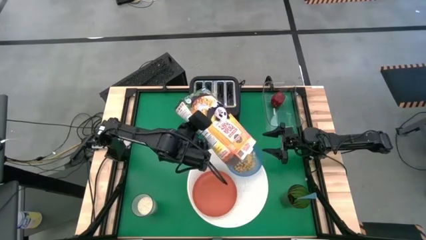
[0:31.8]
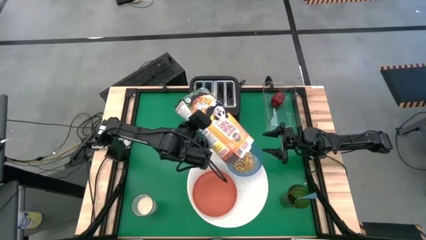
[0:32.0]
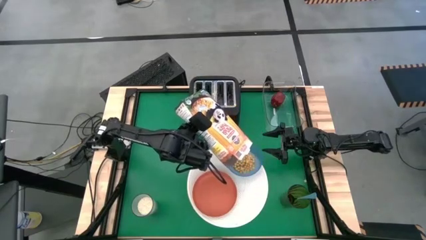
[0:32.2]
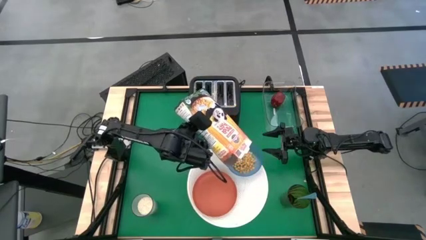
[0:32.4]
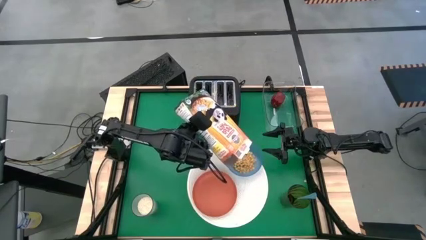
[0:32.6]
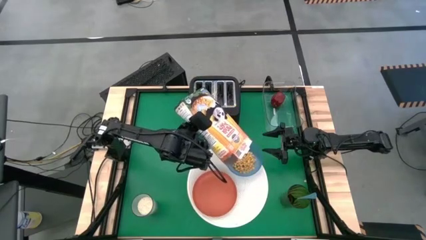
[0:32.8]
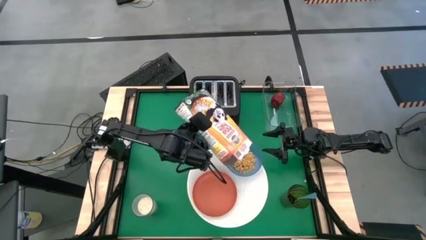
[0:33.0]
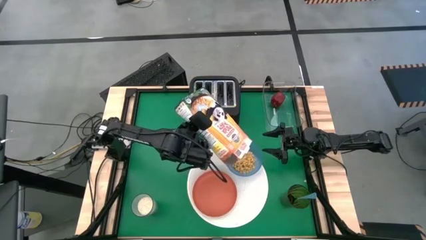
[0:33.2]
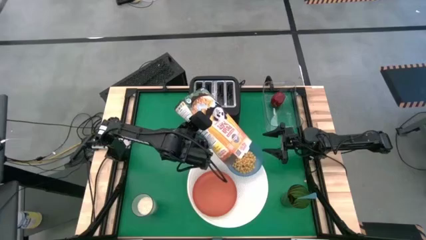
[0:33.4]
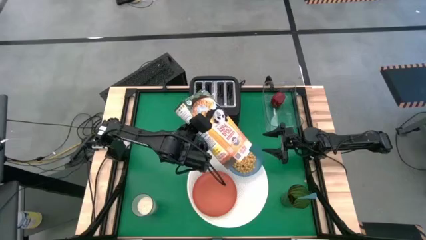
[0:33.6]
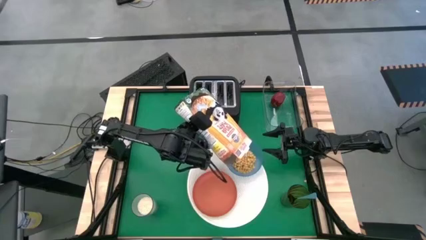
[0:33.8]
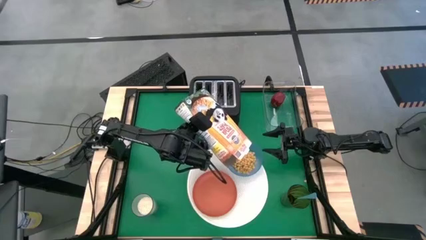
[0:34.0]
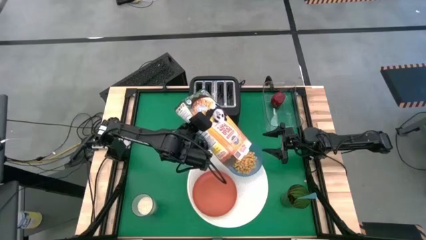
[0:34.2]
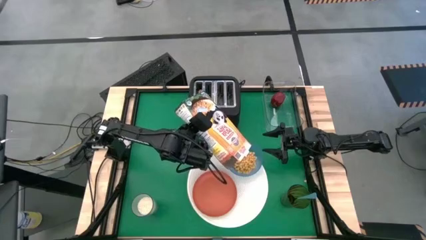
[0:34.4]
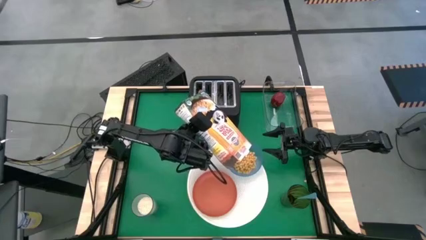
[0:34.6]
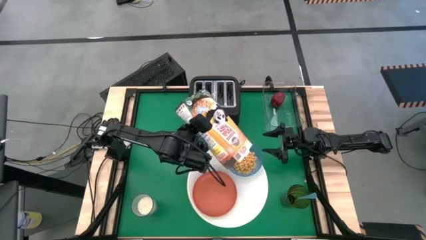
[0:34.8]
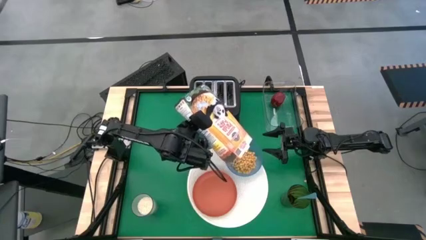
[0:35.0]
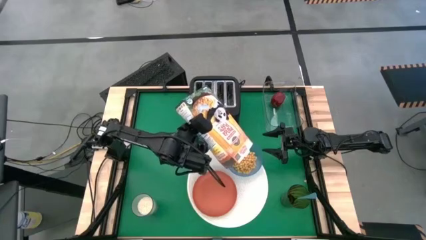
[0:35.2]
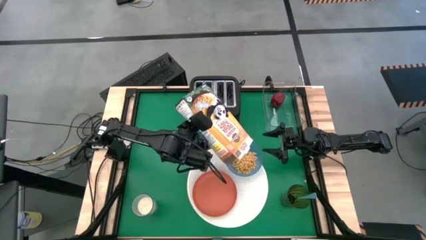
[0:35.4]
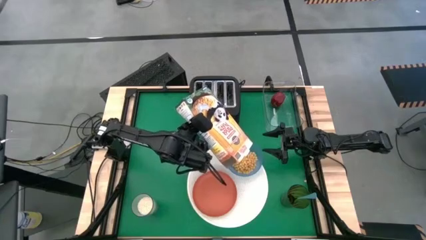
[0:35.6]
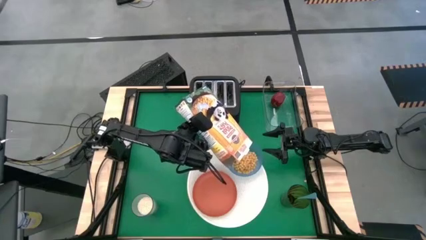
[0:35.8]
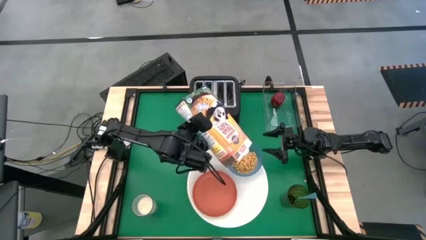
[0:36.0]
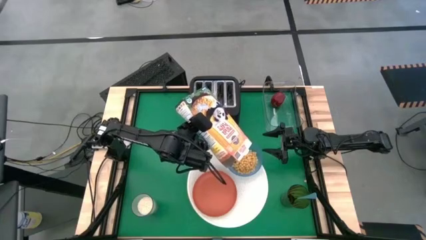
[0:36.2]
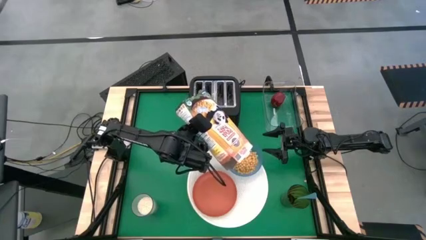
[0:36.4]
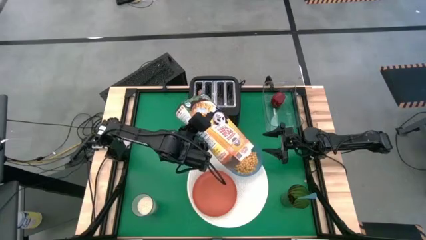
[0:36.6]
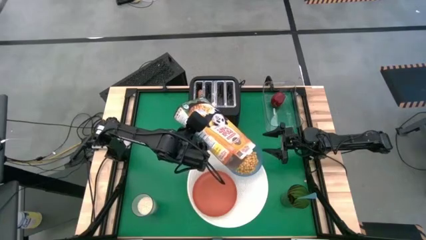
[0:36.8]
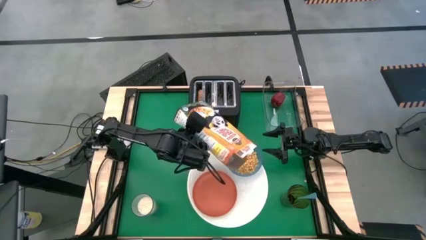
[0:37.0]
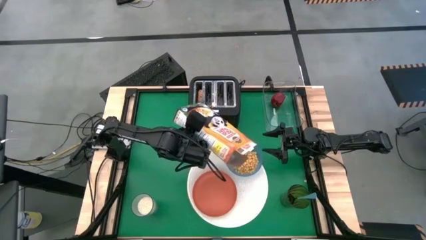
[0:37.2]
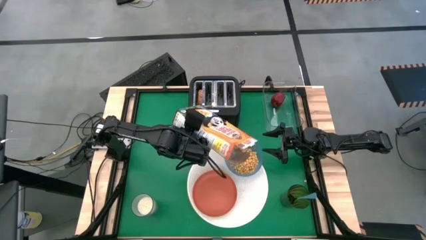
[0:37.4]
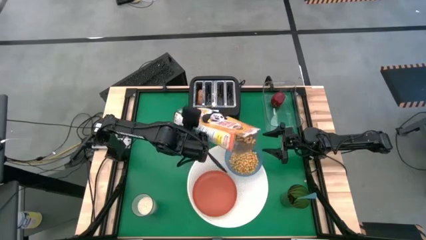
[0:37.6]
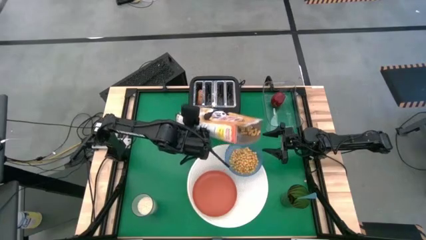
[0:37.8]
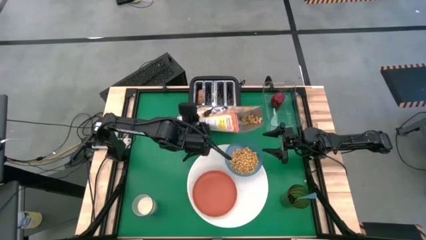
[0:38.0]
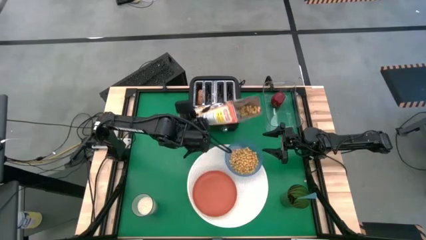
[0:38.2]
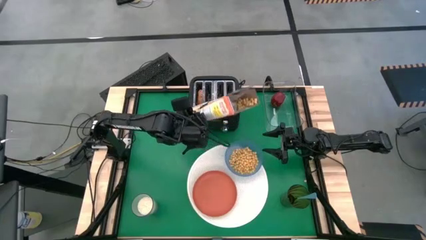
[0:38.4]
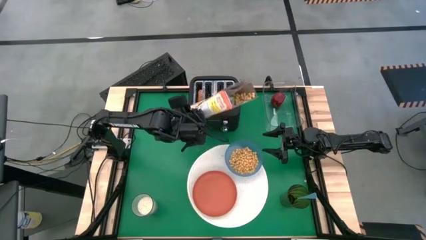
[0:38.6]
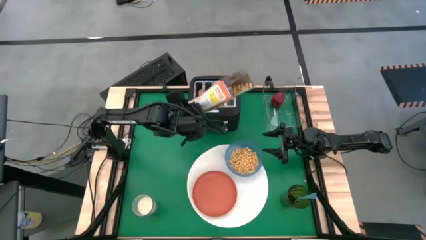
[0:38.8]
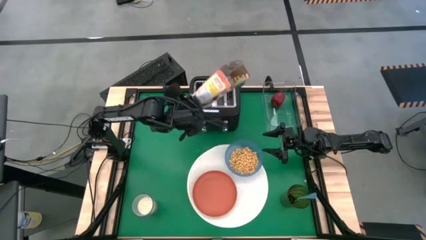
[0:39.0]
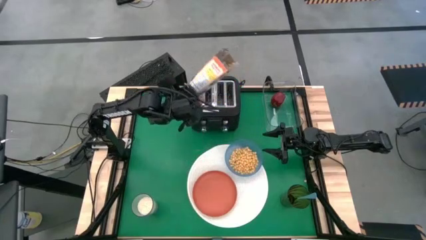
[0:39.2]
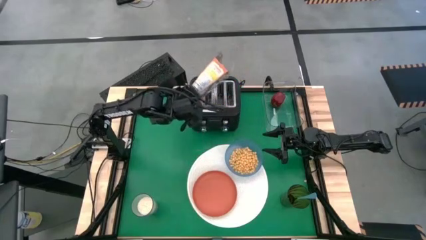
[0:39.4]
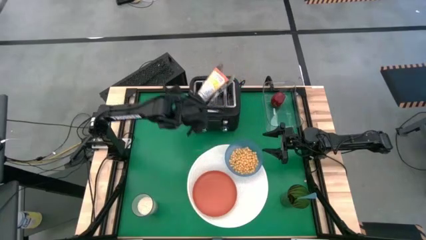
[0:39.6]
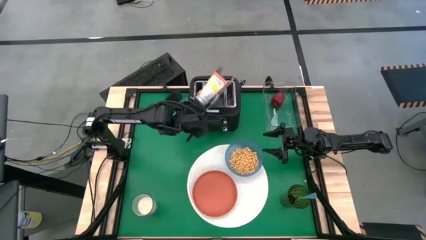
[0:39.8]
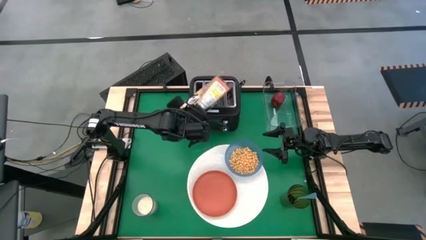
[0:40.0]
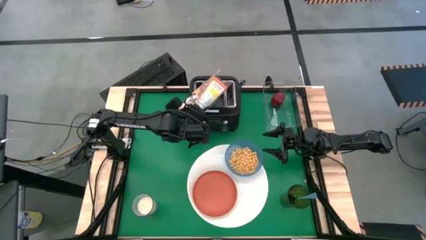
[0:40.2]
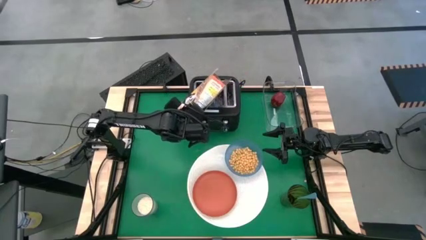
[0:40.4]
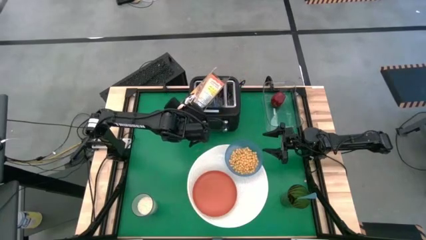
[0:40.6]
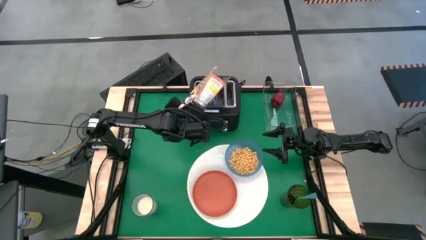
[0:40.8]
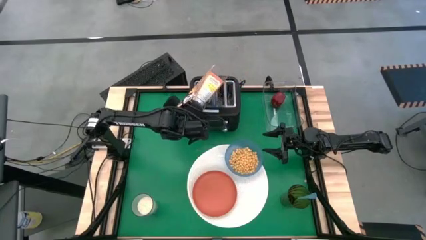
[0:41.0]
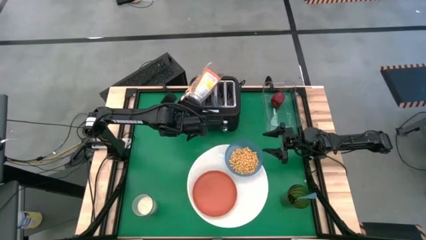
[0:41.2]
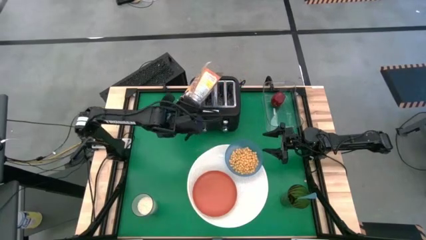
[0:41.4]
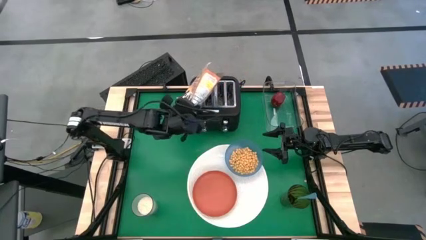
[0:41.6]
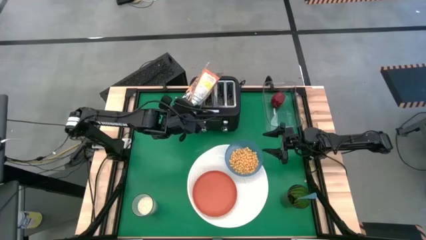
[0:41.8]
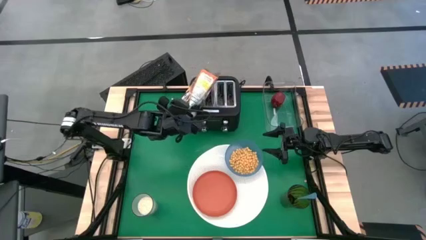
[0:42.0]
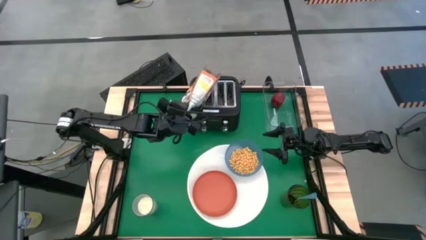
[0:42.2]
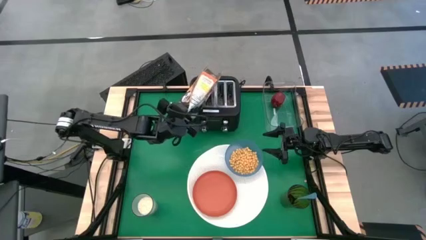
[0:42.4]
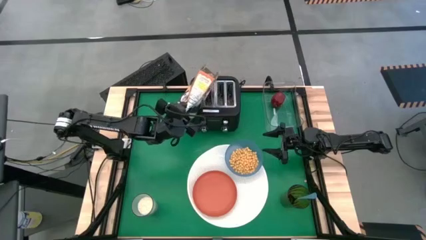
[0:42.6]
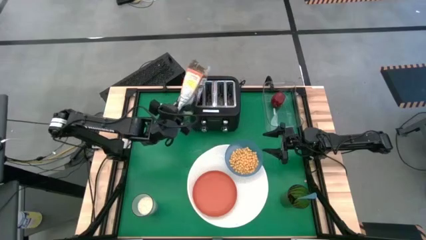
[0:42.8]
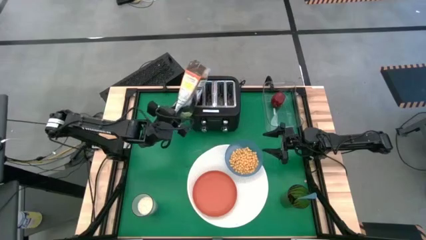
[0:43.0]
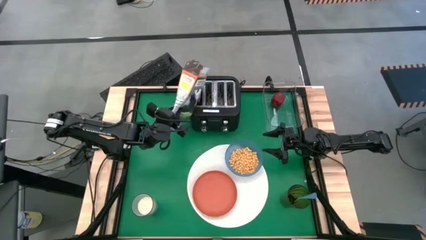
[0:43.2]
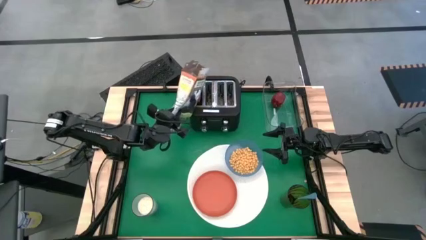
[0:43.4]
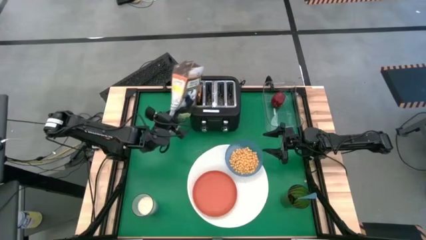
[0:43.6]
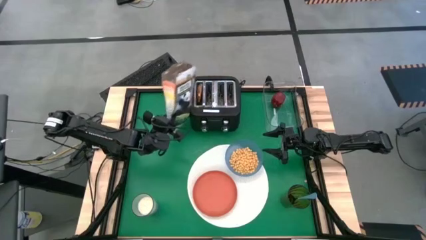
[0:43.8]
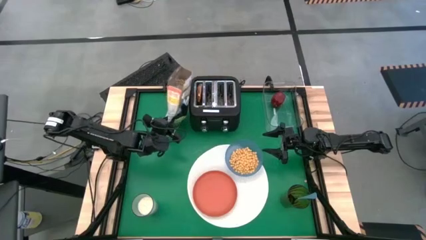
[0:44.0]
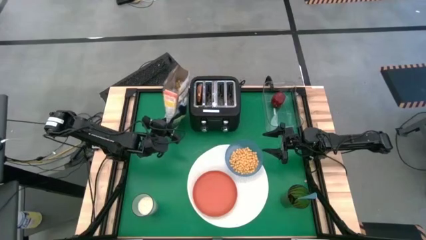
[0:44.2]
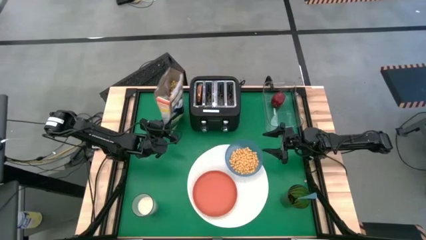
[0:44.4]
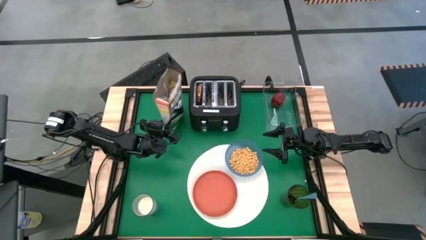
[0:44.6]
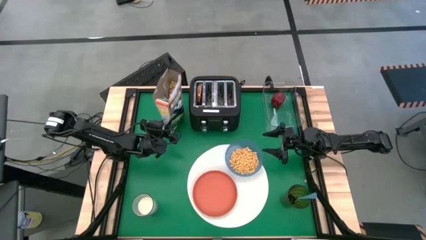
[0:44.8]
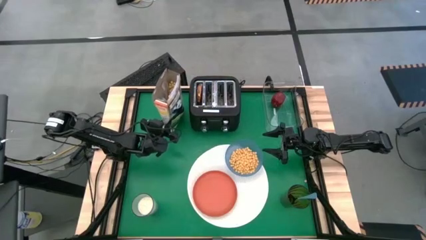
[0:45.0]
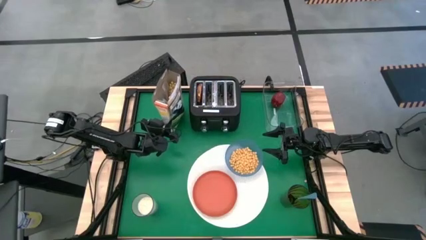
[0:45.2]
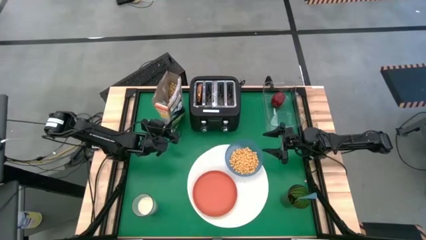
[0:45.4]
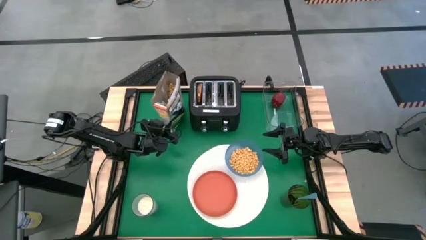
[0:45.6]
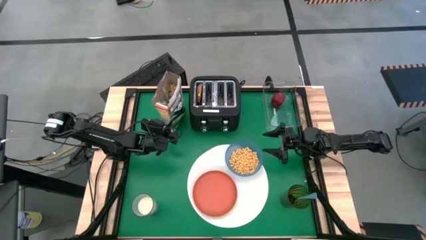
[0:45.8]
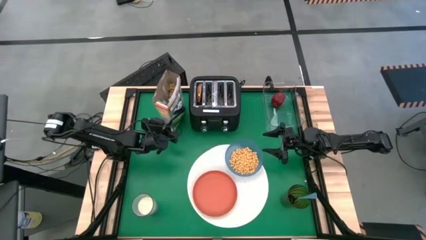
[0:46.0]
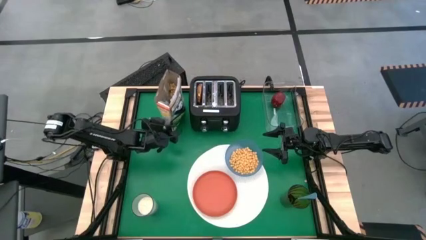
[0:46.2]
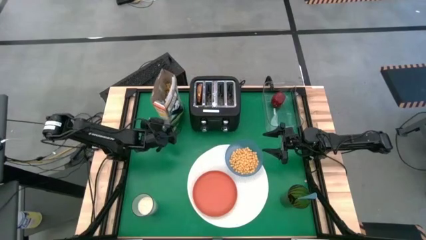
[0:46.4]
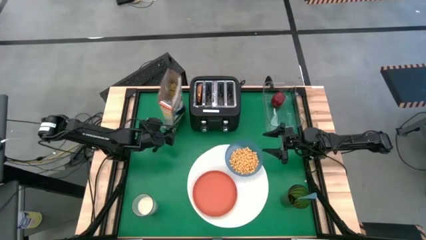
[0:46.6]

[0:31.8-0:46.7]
Task: Arrange a breakfast setting
Pour the cereal into the blue bowl
